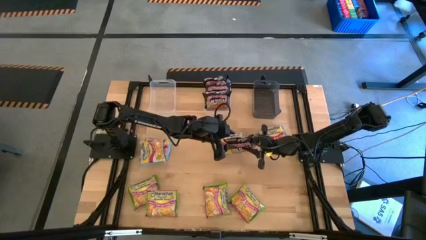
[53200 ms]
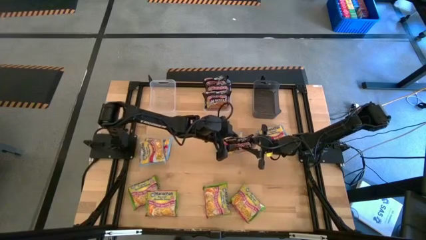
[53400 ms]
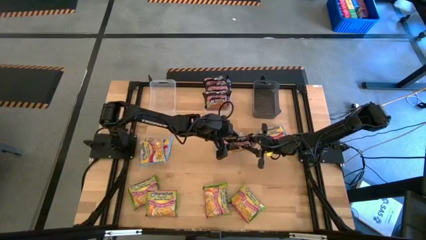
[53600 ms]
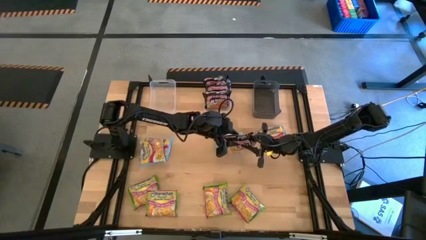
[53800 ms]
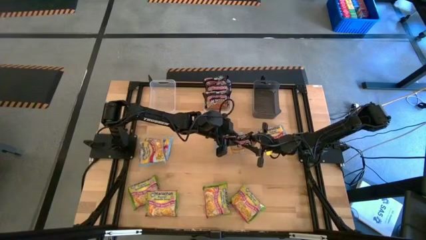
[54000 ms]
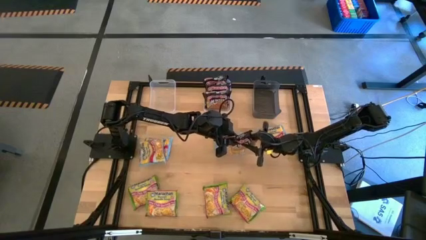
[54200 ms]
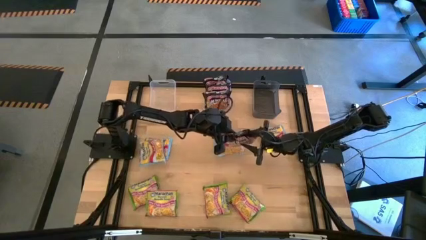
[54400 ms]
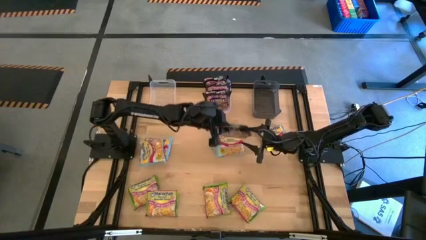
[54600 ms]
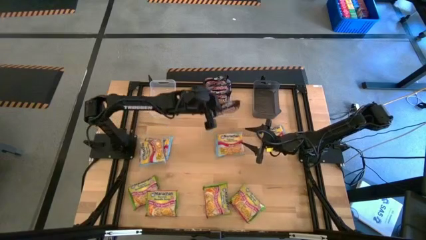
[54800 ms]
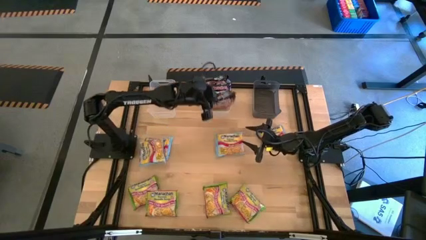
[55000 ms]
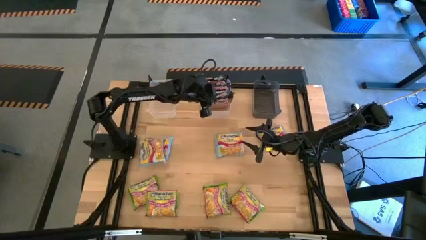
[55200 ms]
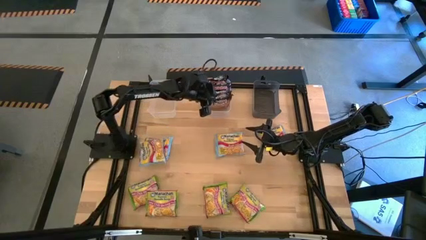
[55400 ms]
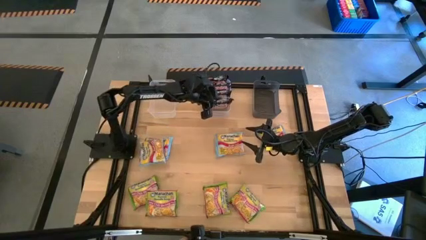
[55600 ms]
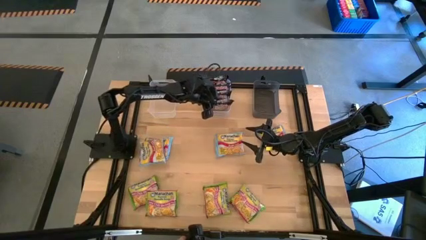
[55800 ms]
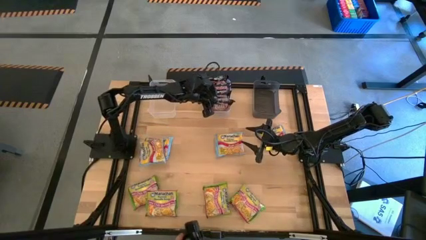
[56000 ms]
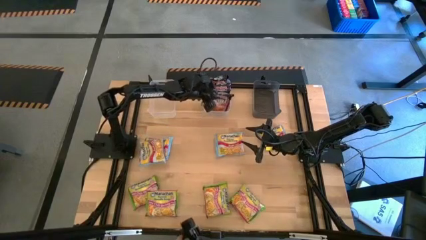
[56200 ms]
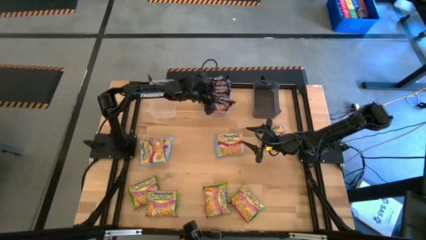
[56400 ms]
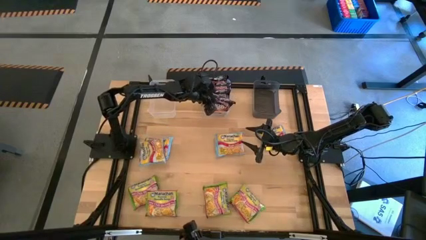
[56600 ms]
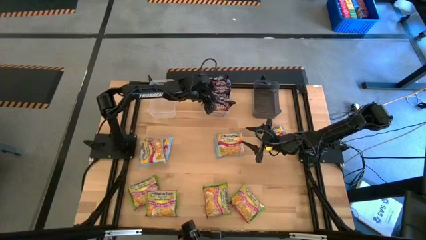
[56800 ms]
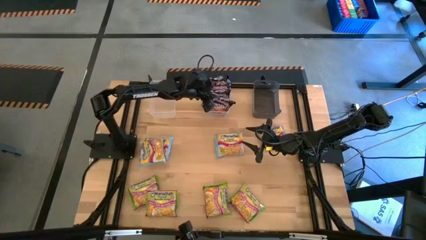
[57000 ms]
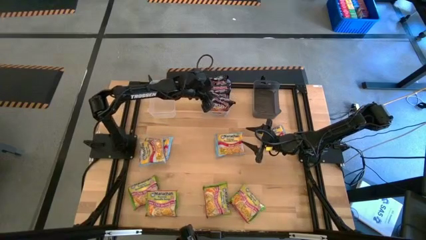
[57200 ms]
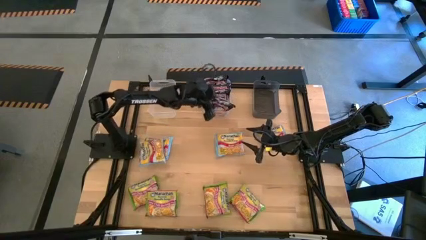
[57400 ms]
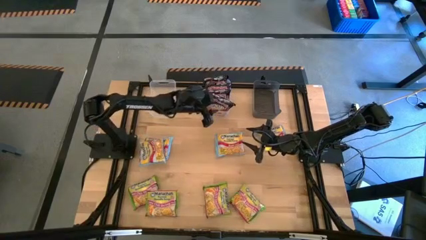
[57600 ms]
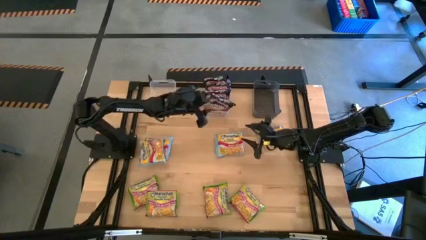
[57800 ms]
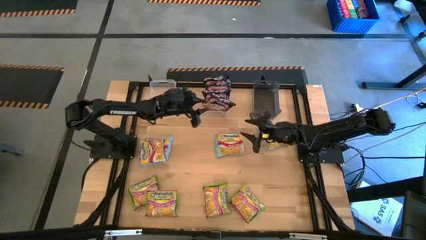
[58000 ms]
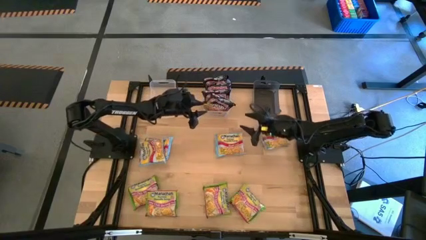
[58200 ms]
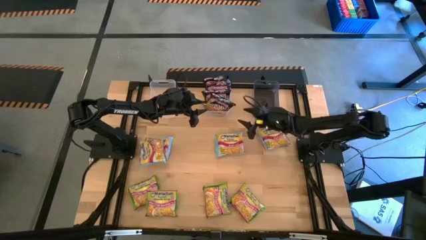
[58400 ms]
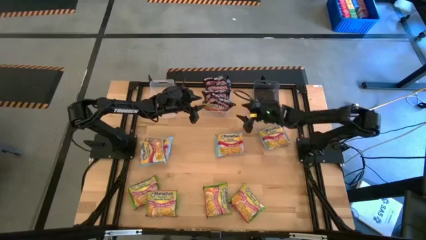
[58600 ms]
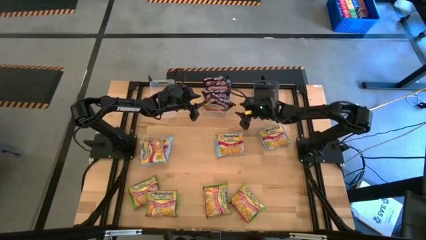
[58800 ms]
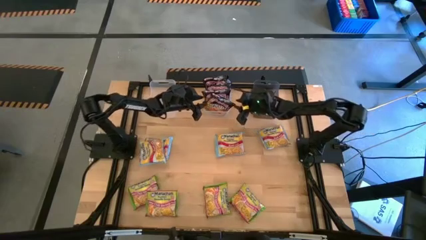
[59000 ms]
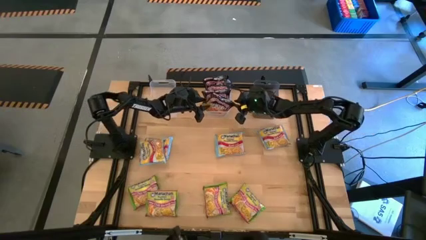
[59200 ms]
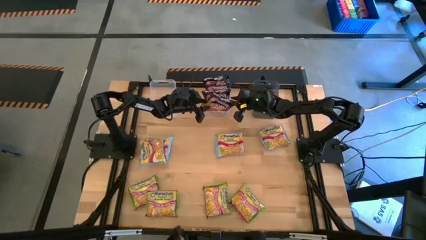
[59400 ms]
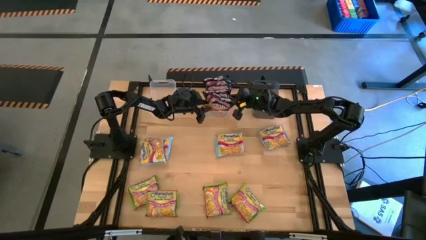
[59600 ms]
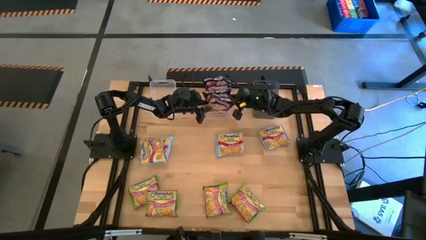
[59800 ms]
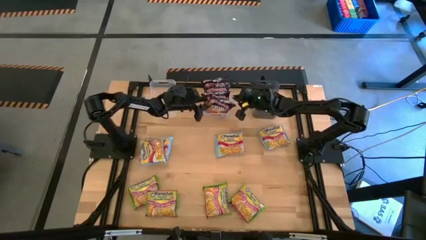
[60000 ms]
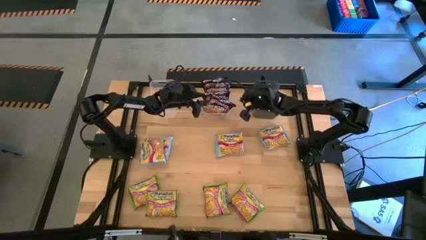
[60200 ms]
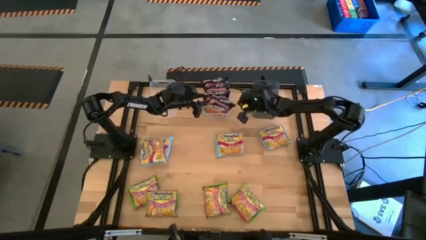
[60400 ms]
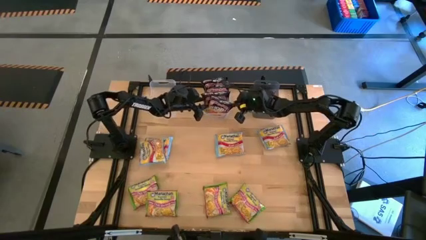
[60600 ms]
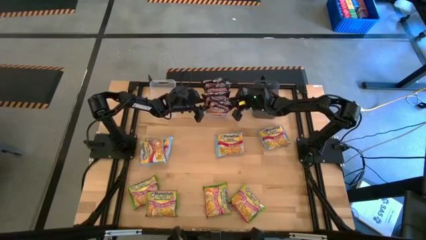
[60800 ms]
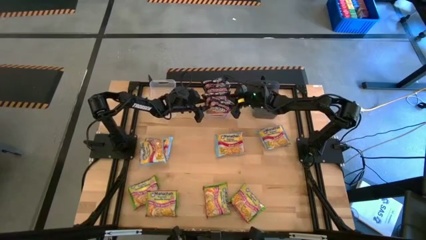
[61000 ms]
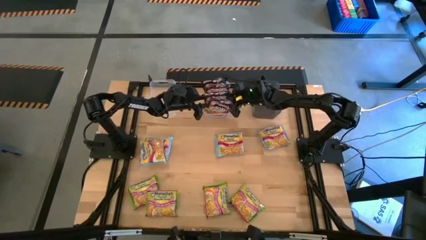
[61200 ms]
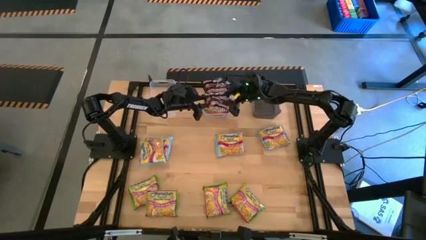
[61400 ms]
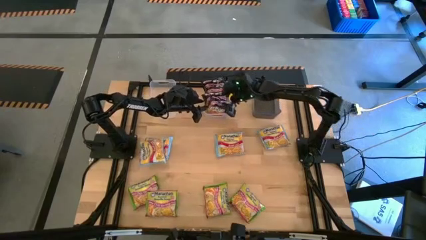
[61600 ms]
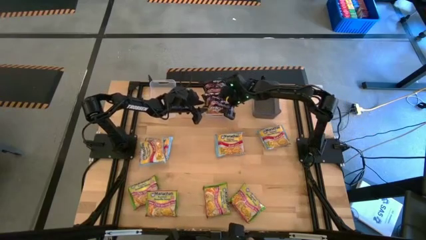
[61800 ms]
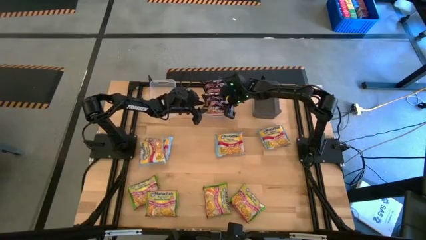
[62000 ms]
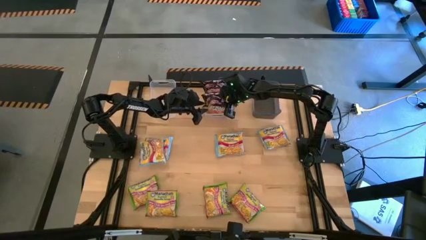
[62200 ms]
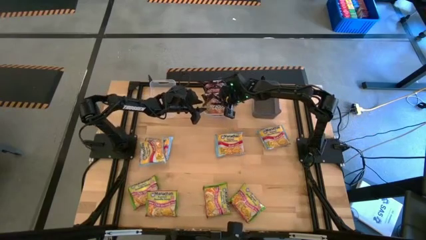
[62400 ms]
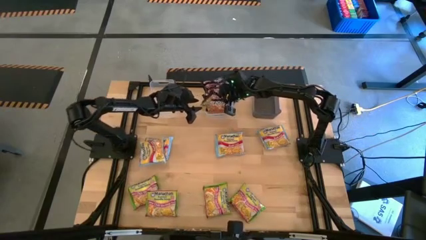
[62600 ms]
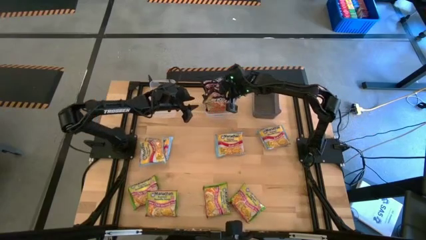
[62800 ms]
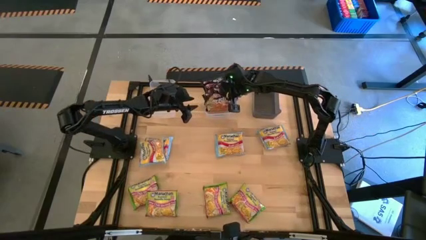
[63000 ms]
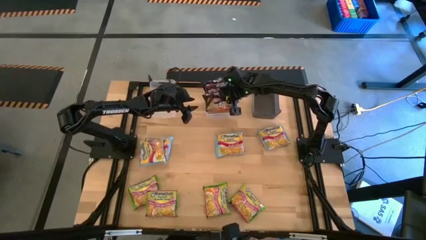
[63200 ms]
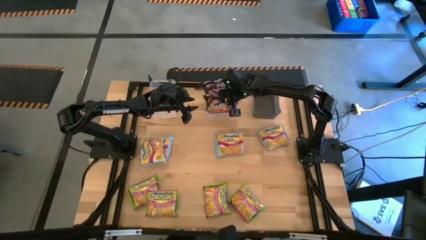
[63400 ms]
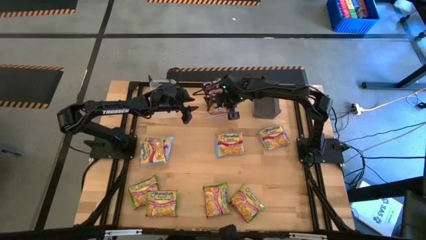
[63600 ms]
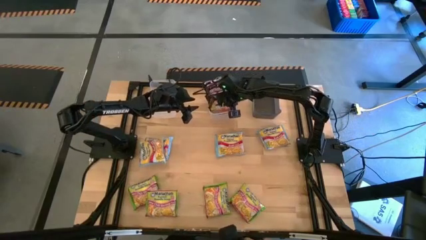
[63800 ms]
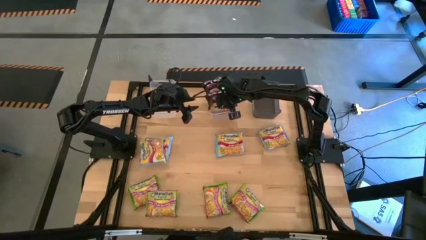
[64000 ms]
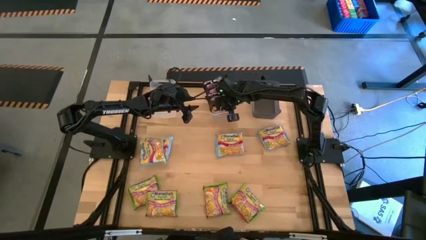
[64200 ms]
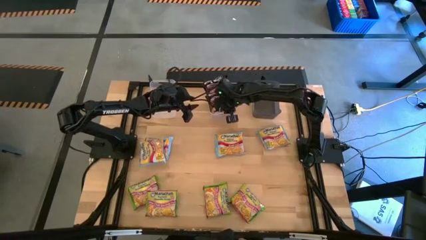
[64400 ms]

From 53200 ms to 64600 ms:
Task: Sort Maruchan noodles
Put the black noodle pack into the right transparent bin
